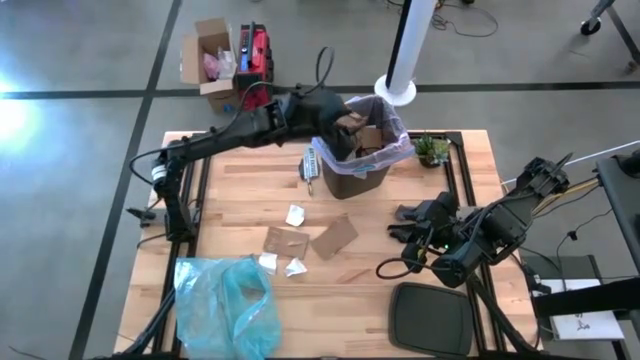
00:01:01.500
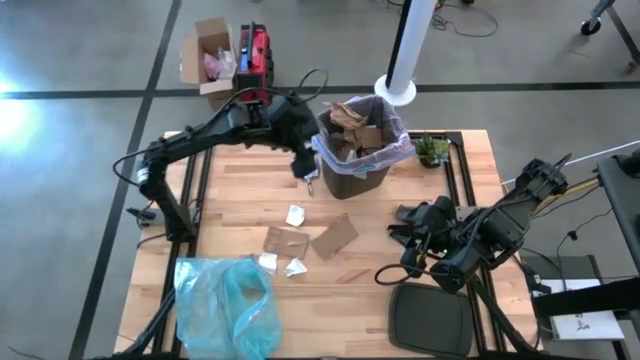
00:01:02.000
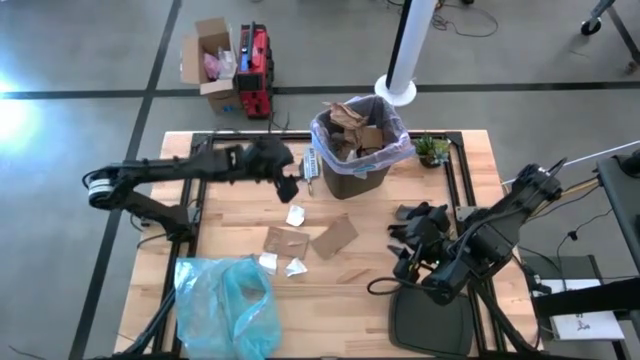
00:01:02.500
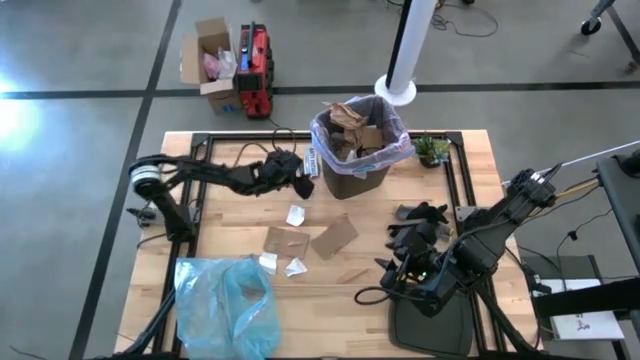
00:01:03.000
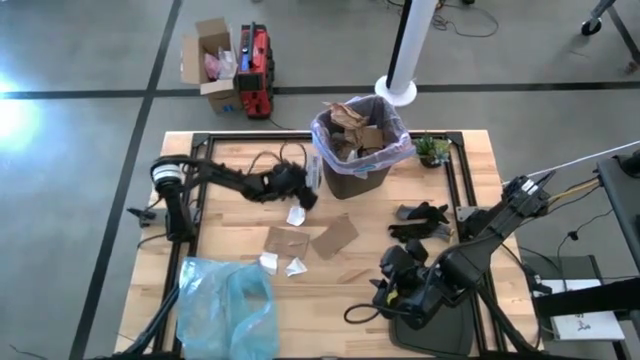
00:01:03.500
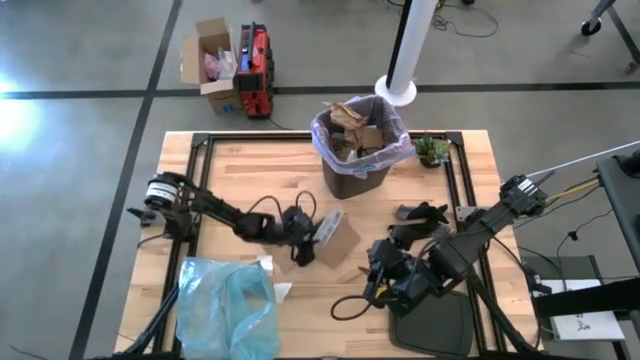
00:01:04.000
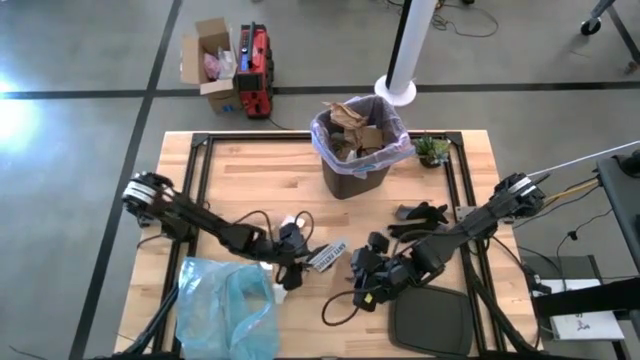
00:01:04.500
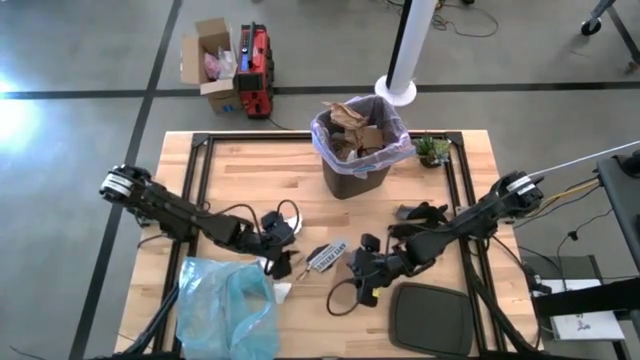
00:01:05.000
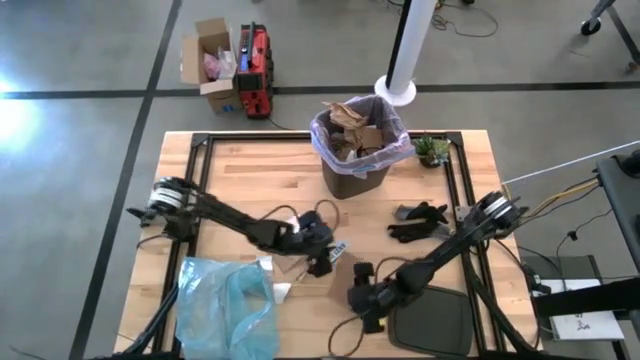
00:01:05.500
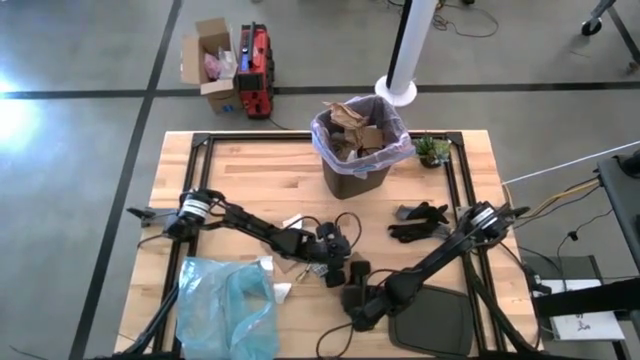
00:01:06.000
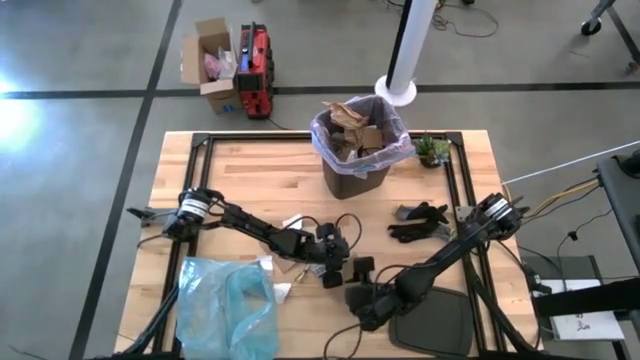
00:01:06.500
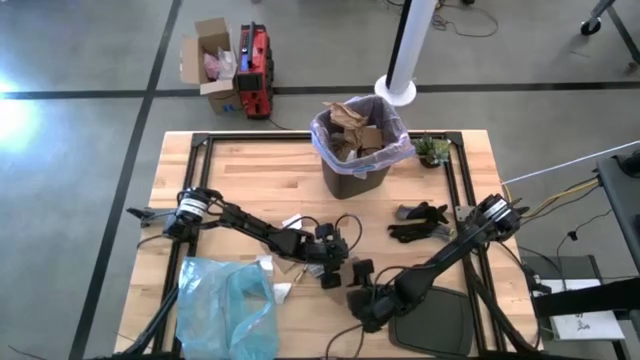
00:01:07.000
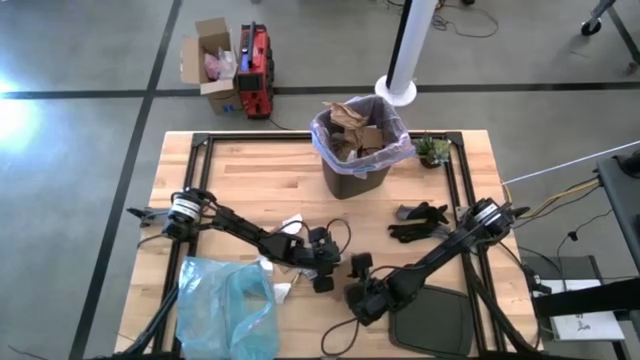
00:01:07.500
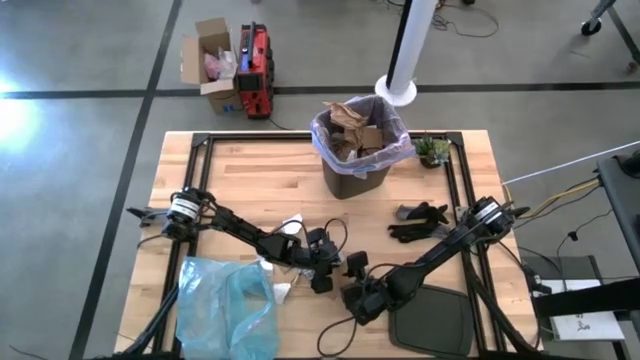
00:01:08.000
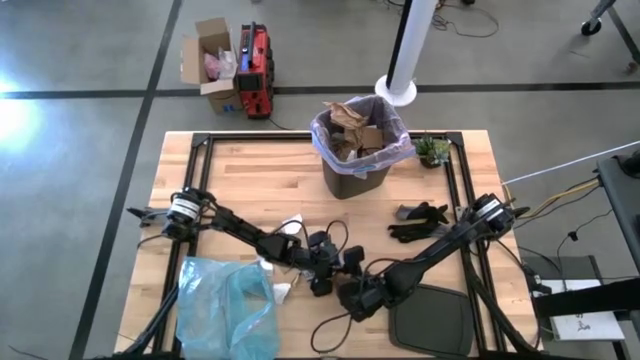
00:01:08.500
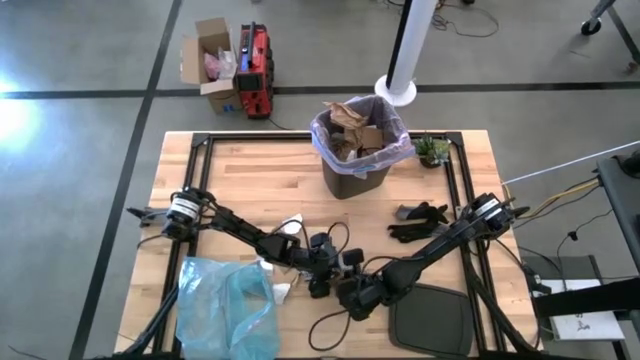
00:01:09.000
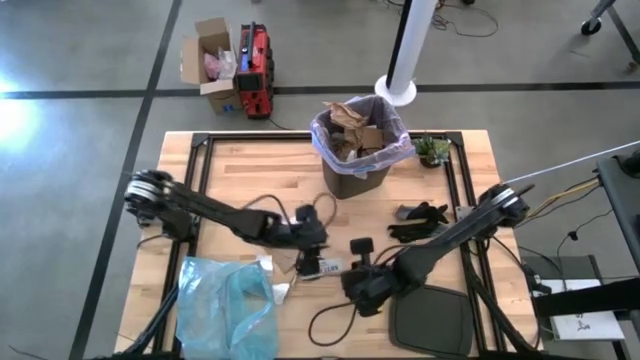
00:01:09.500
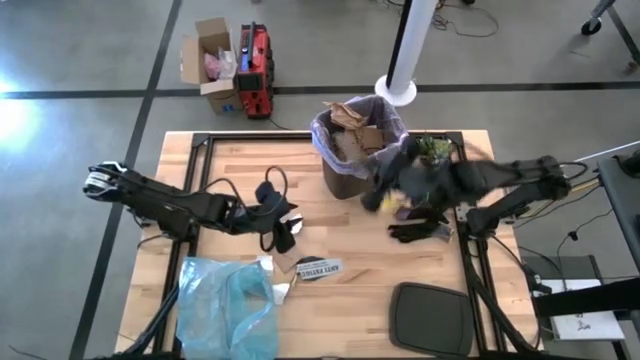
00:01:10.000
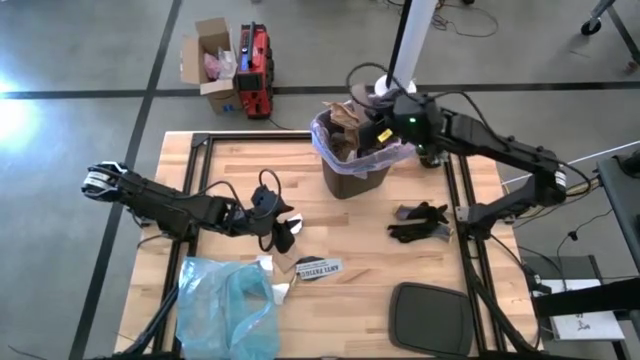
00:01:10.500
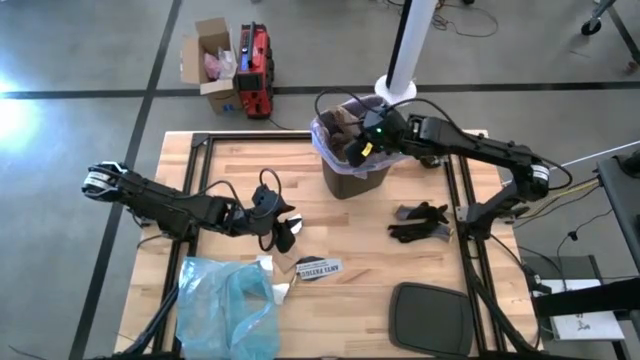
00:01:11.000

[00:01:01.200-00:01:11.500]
Task: place trash/remove bag and relplace
Put the cardboard into the trash bin

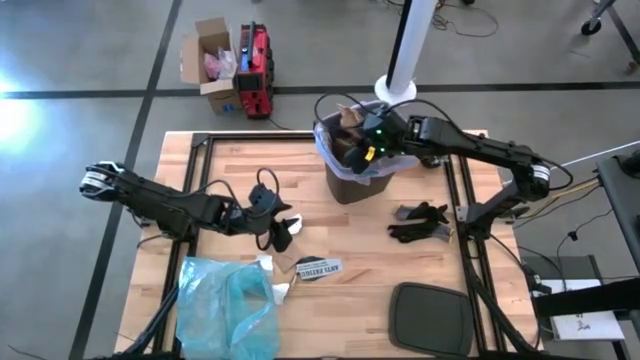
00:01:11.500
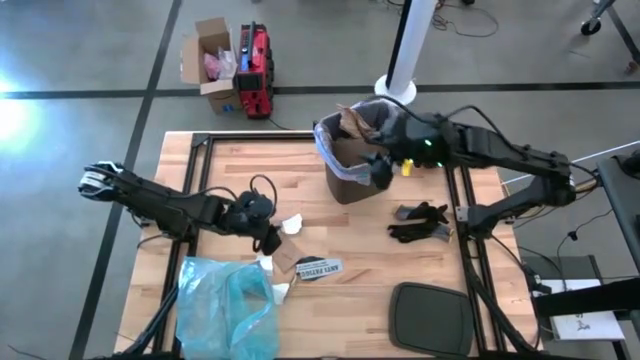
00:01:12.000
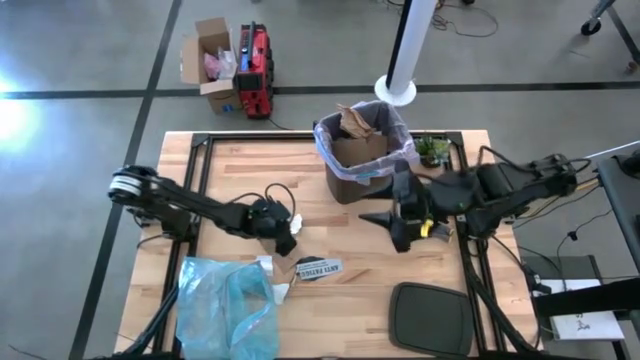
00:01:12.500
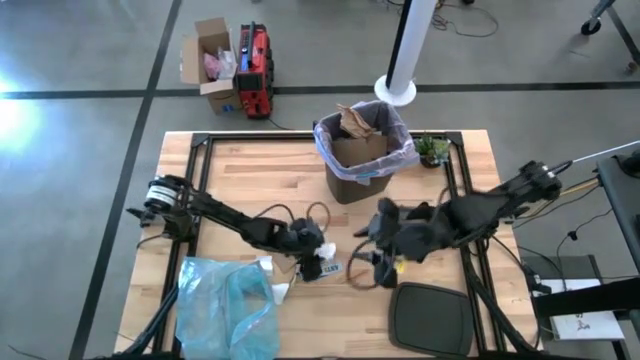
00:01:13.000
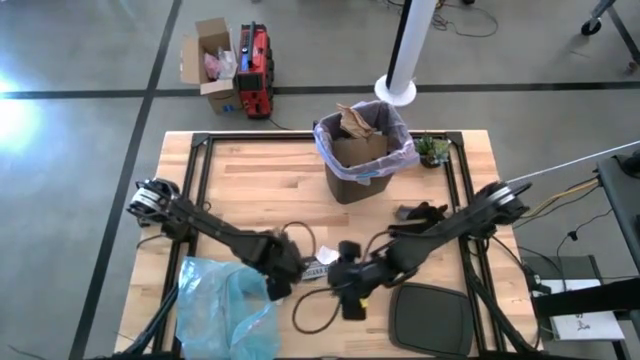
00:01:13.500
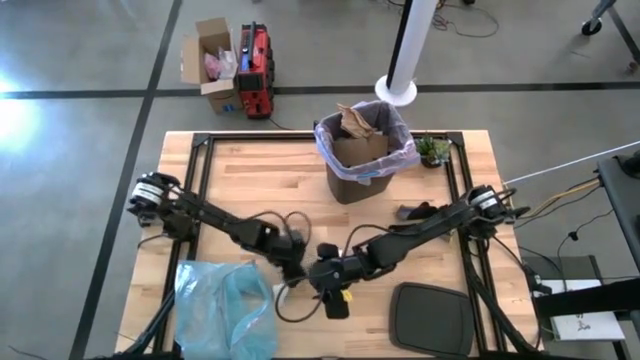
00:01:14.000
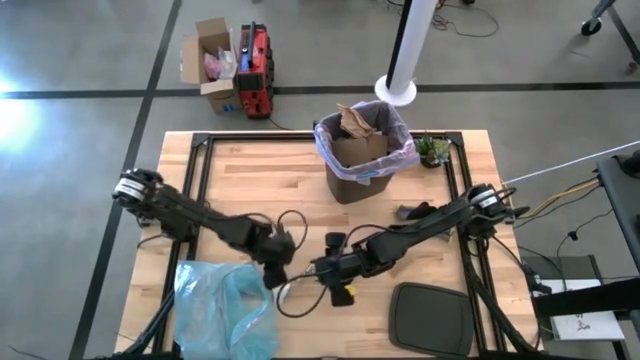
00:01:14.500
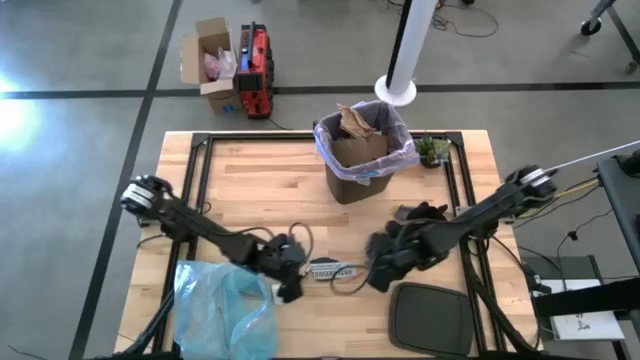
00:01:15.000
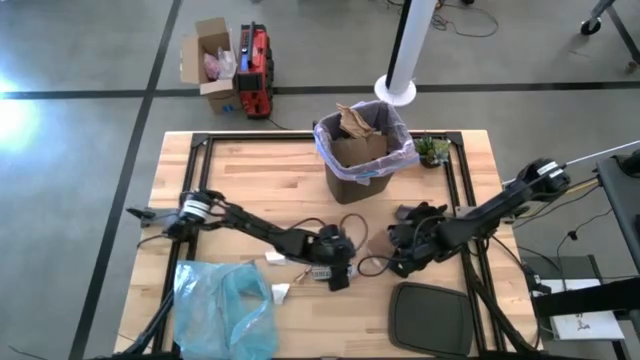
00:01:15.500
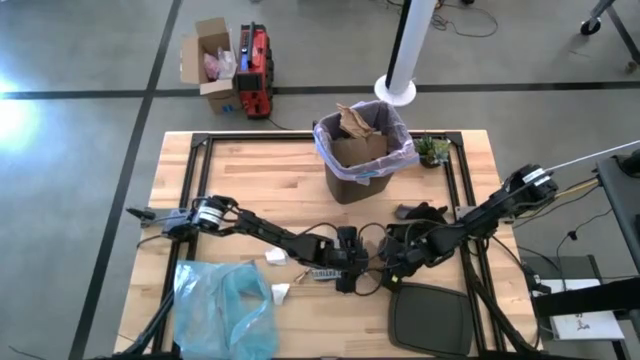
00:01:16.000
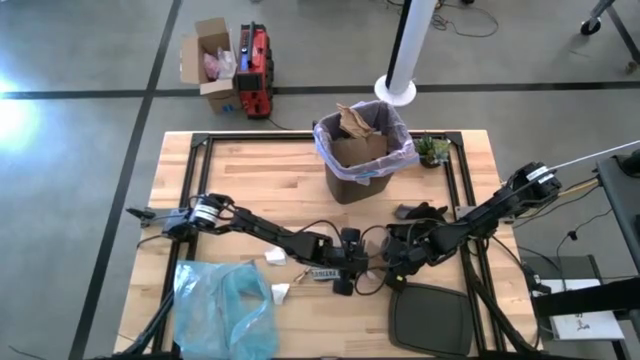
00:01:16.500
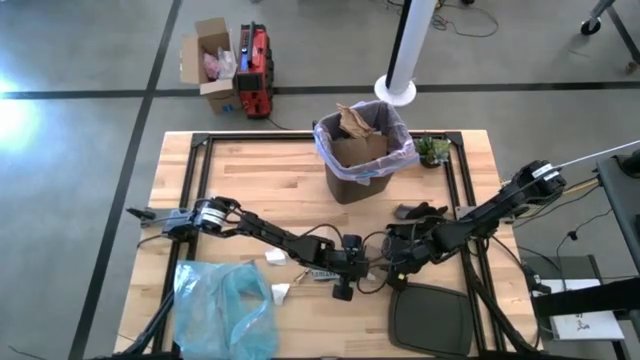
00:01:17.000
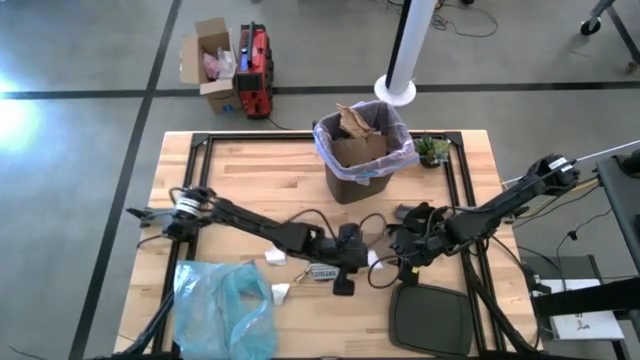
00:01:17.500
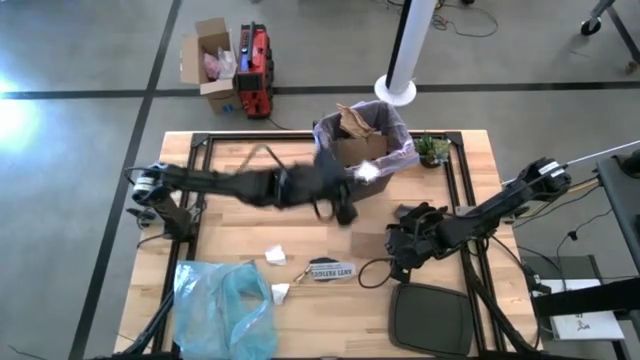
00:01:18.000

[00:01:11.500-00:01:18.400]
Put the white paper into the trash bin

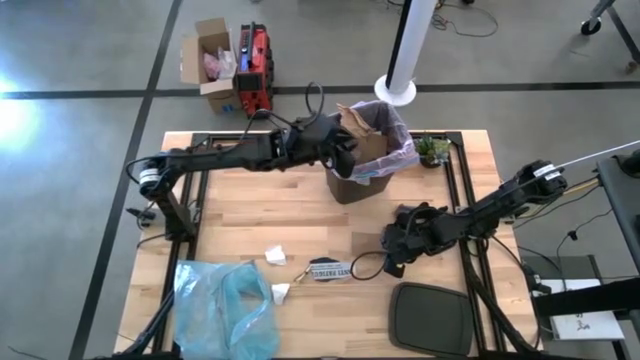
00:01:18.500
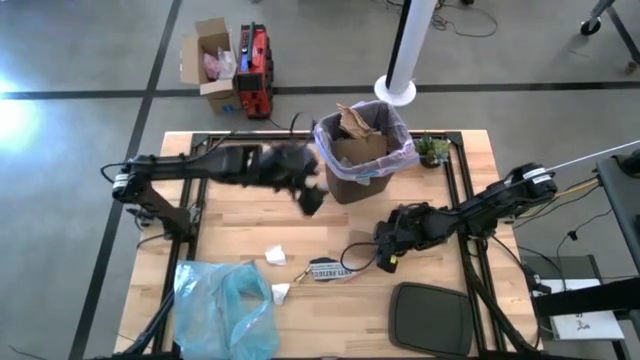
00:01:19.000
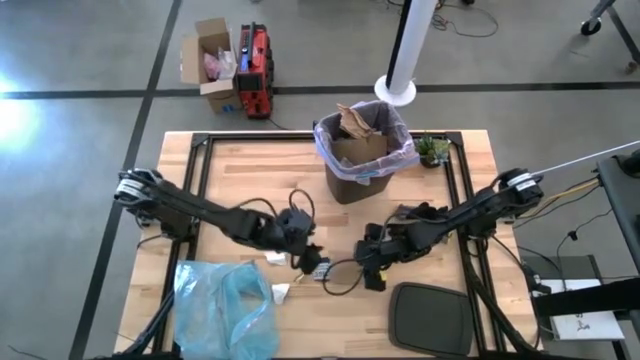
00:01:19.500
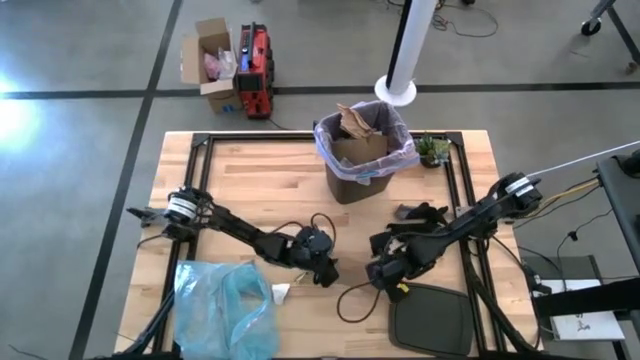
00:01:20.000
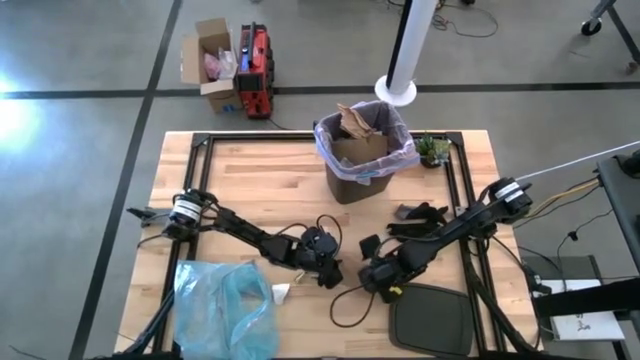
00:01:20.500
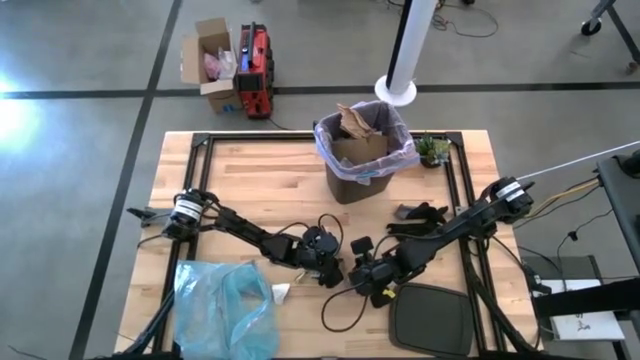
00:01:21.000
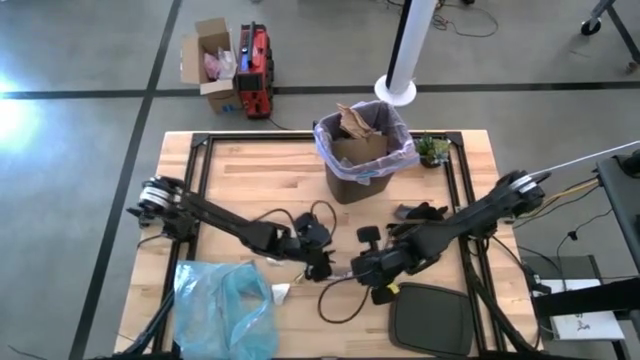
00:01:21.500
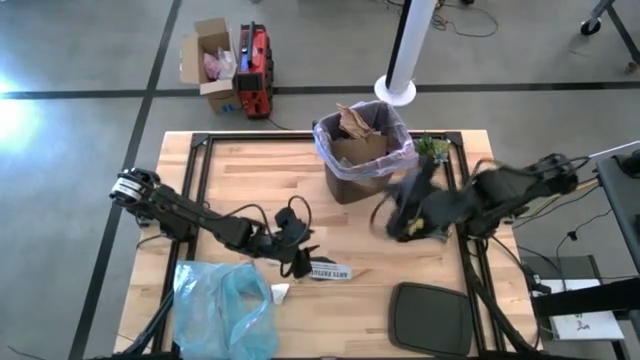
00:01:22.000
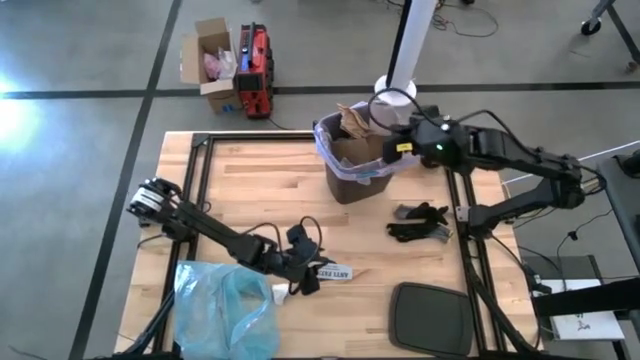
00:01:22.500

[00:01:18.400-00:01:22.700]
Put the cardboard into the trash bin

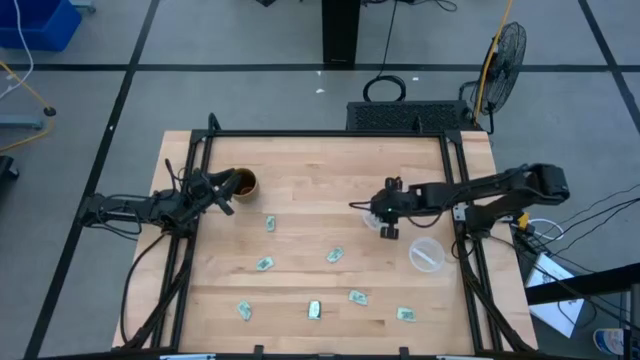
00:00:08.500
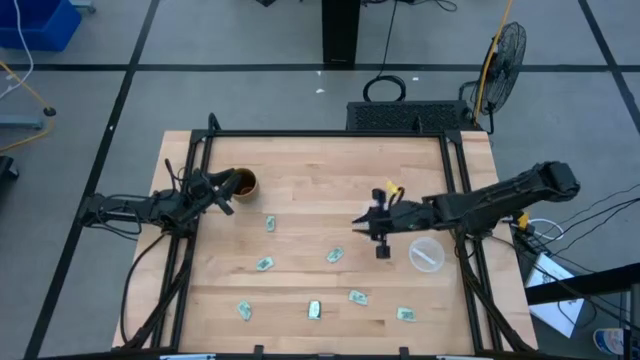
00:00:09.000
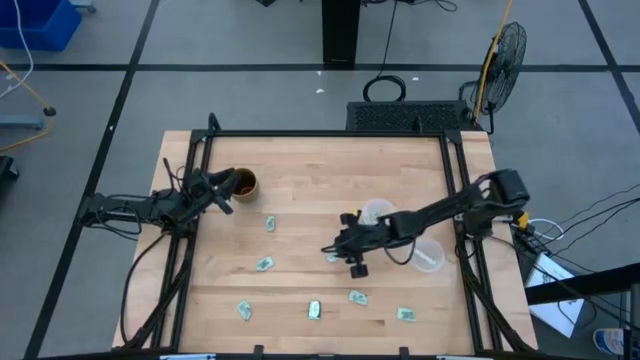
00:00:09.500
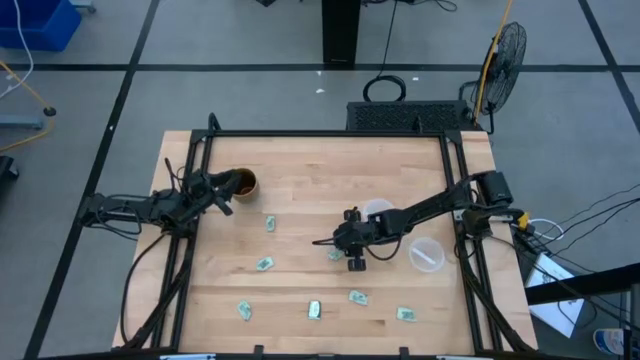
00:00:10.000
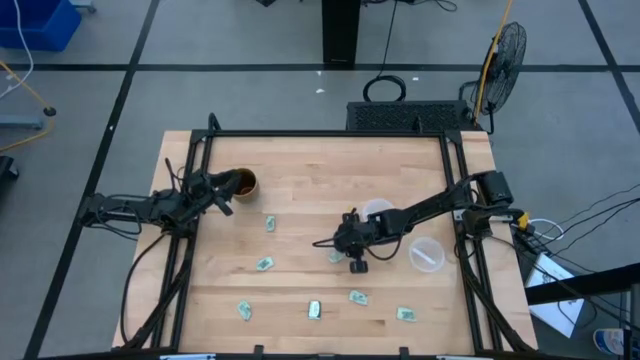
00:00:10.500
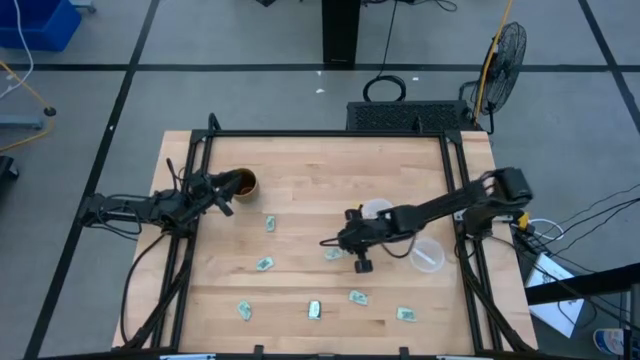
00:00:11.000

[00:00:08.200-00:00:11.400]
Task: Pick and place items into bin
Put the white stevia packet into the bottom transparent bin
